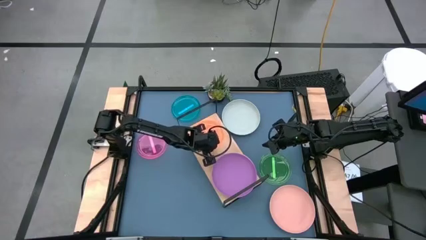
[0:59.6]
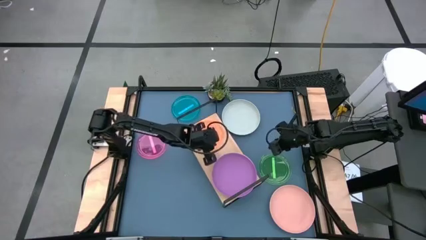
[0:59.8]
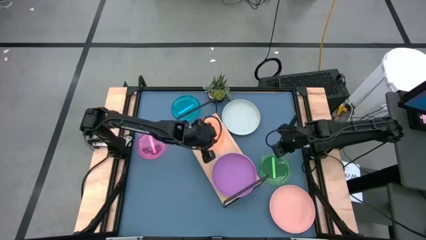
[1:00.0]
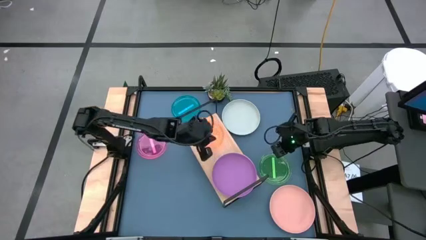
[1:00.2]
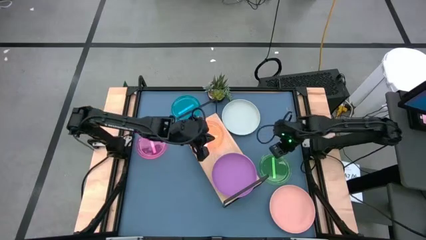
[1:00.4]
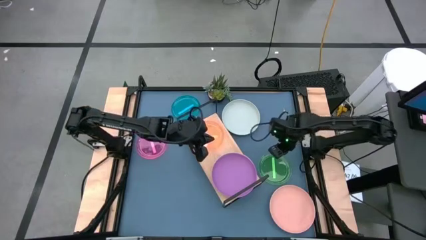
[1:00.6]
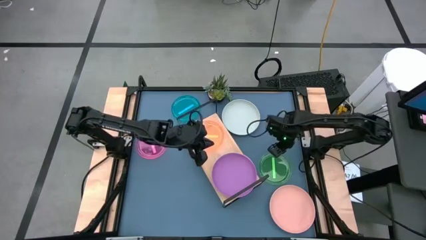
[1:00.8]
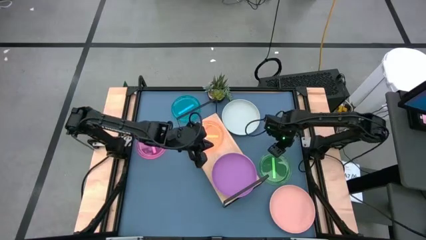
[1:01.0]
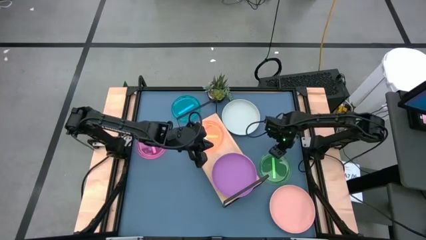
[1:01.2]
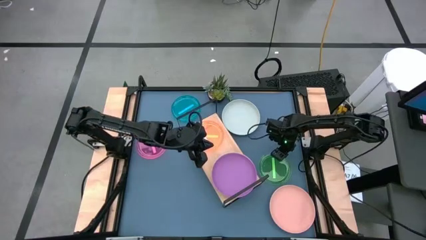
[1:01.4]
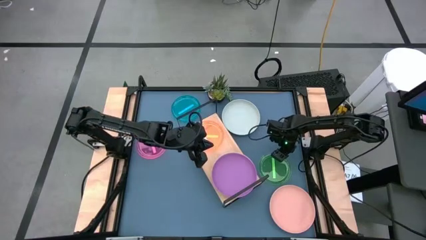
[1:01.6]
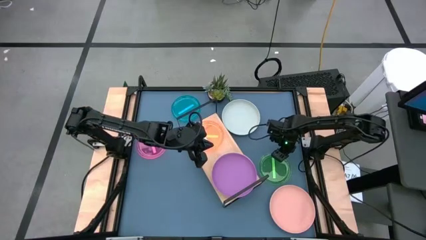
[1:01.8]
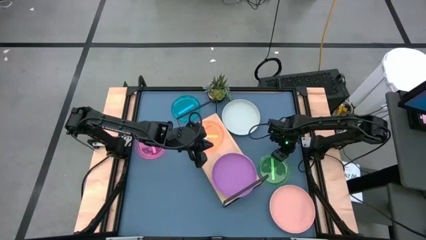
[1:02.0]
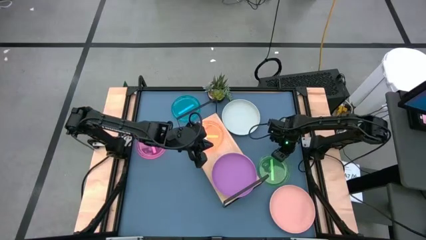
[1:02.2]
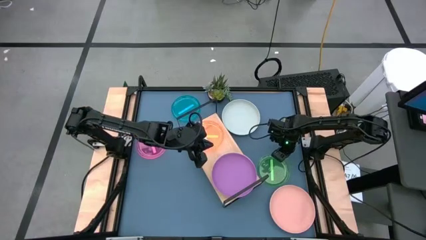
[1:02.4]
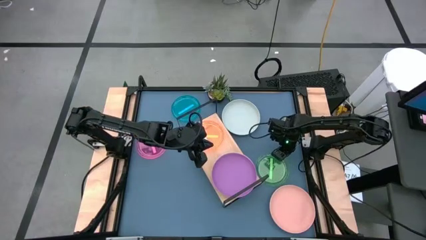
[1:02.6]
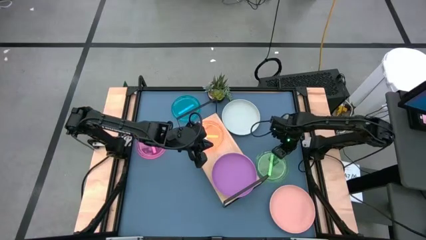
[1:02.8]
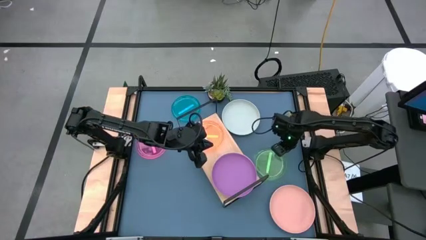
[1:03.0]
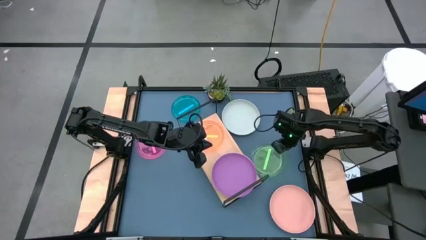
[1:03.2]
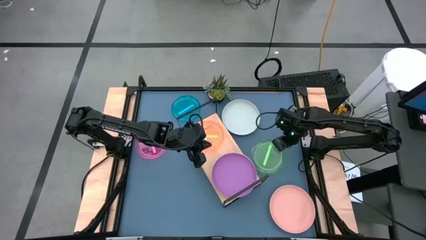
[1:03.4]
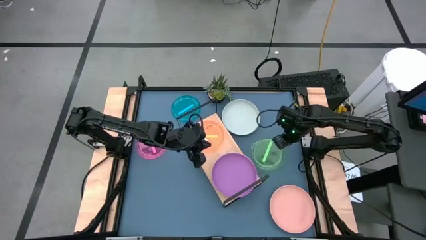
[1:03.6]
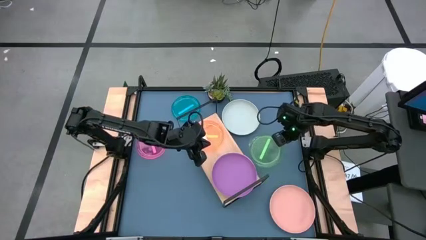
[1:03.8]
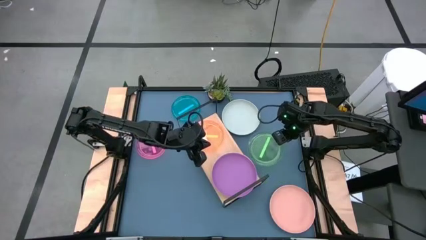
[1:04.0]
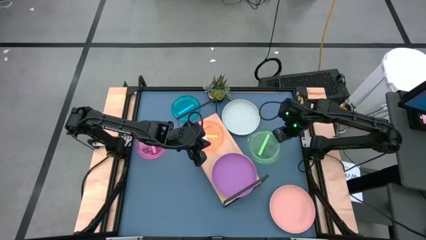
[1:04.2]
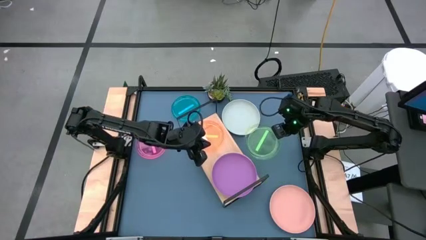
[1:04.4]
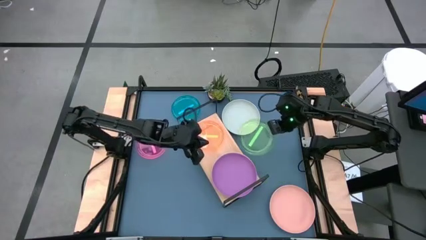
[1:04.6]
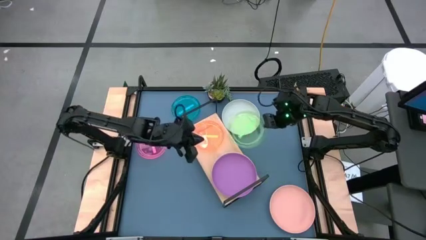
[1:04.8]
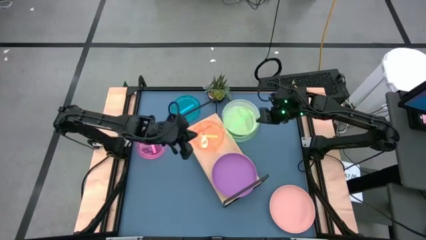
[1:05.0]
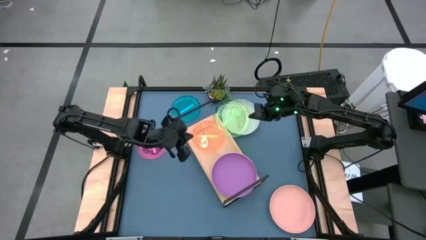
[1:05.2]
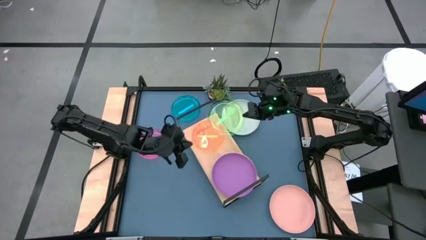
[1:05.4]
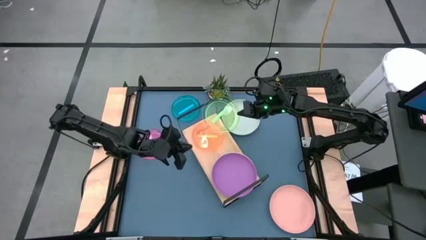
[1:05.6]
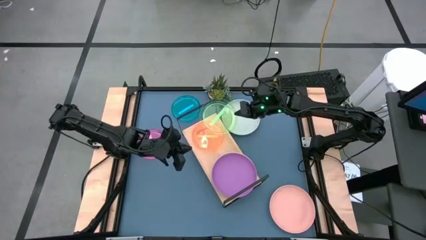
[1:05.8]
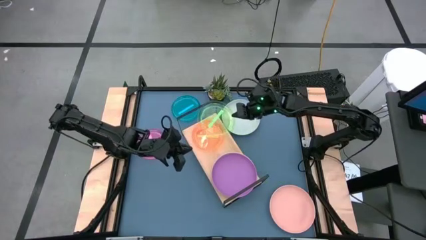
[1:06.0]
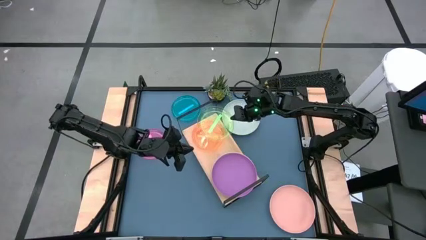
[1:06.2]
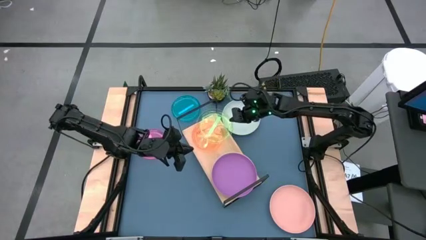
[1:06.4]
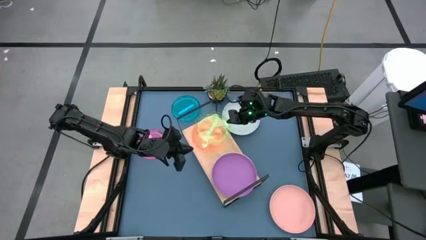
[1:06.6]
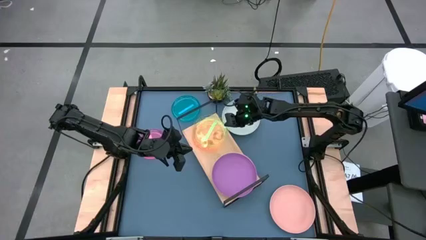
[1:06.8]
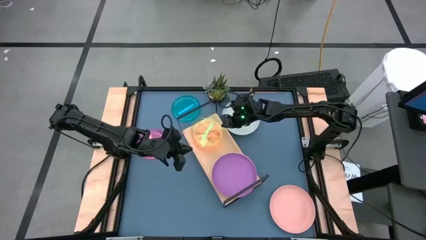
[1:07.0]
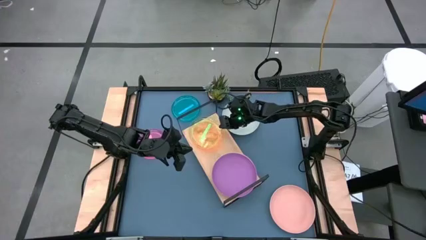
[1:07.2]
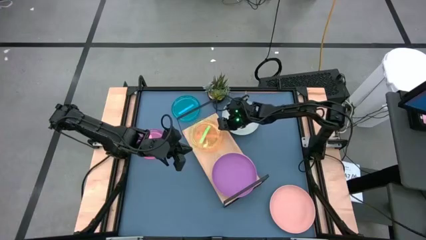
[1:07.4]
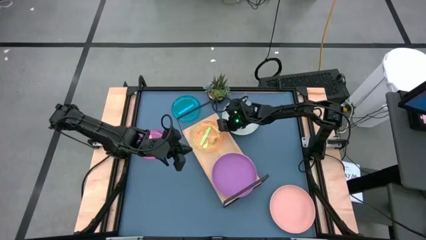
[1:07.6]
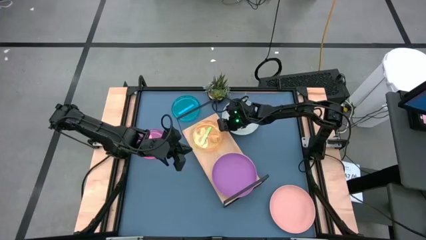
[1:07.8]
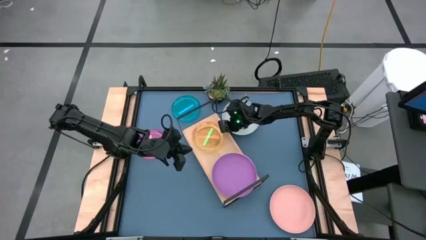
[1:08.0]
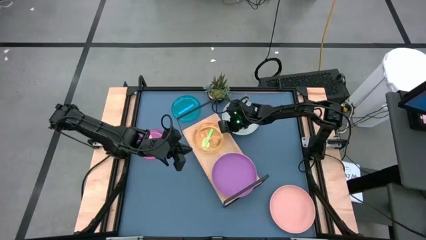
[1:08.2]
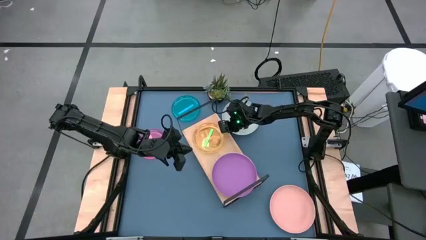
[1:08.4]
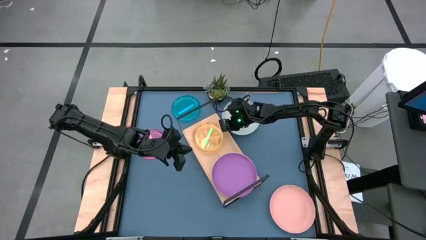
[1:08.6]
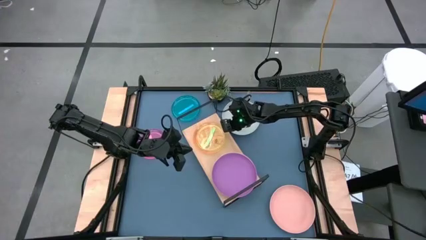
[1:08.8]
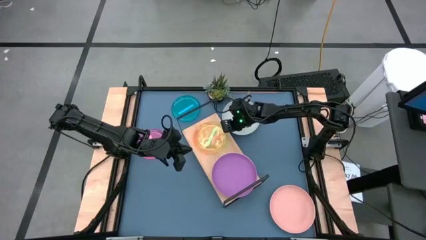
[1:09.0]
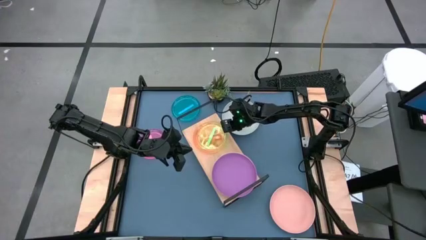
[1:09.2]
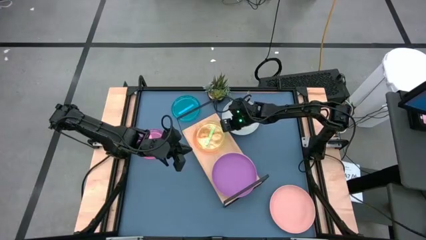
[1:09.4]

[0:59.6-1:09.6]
Task: Place and stack plates onto a shelf
Stack the small green plate on the small orange plate on the shelf

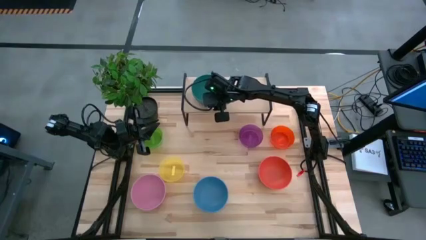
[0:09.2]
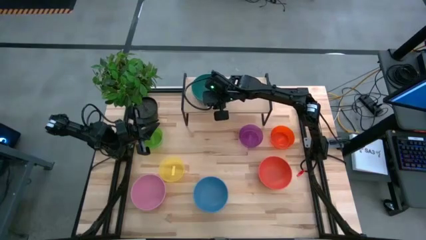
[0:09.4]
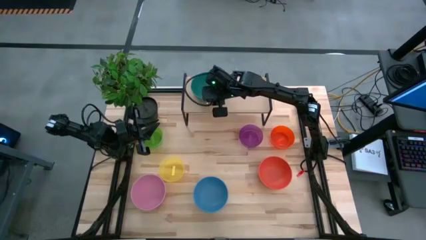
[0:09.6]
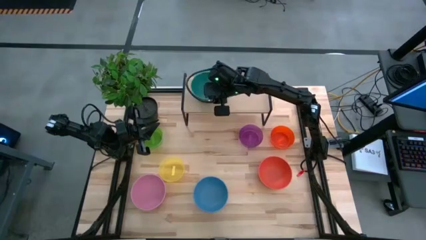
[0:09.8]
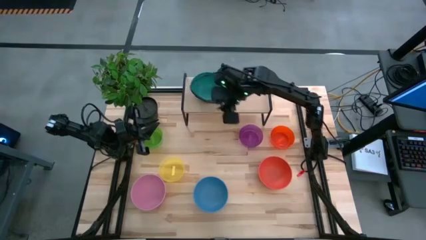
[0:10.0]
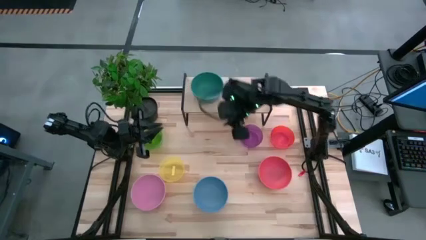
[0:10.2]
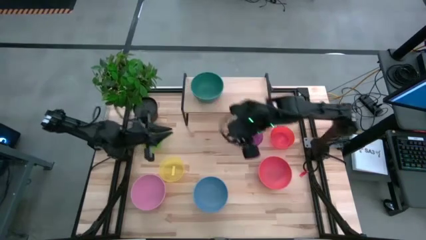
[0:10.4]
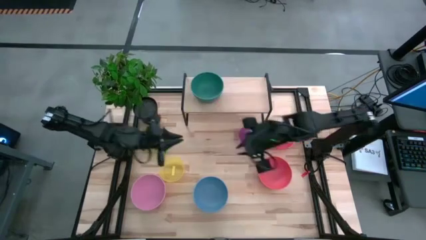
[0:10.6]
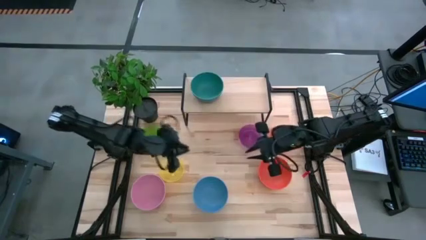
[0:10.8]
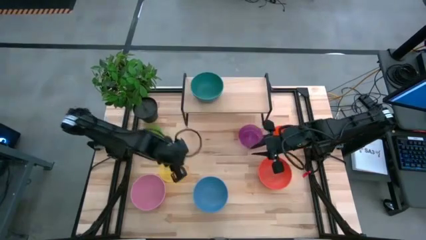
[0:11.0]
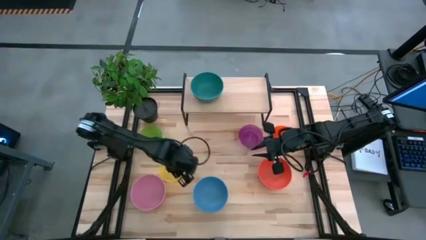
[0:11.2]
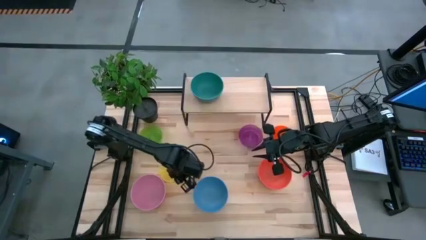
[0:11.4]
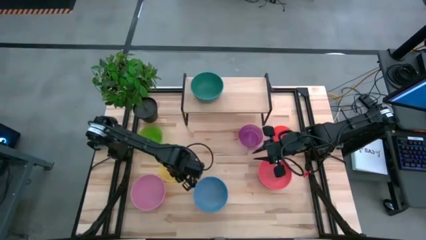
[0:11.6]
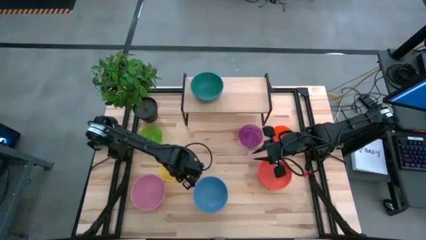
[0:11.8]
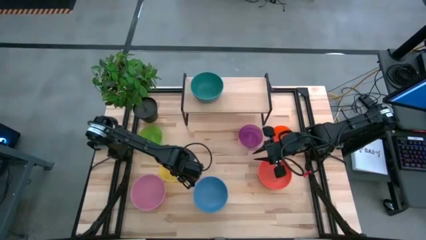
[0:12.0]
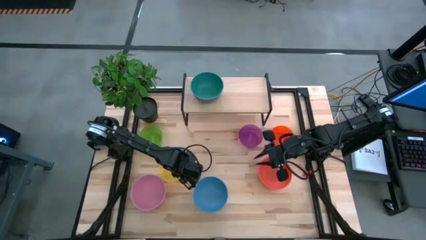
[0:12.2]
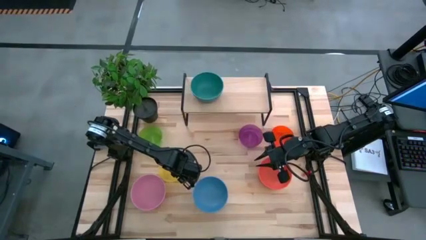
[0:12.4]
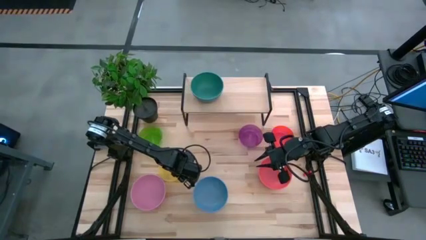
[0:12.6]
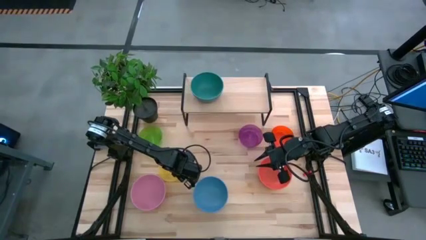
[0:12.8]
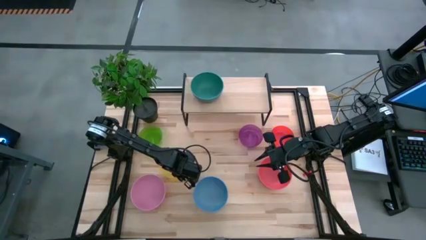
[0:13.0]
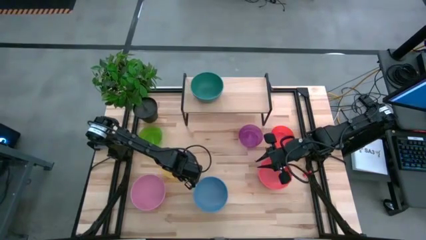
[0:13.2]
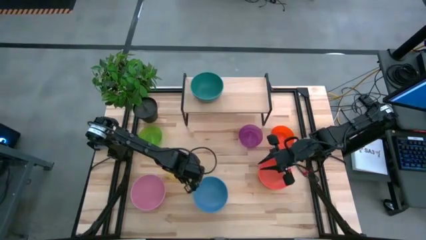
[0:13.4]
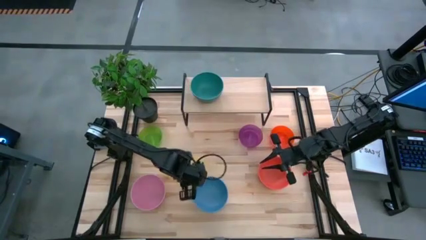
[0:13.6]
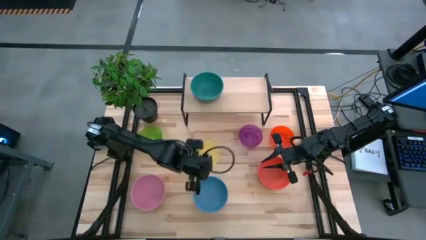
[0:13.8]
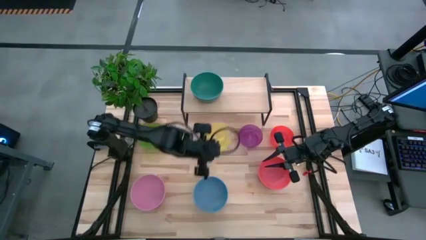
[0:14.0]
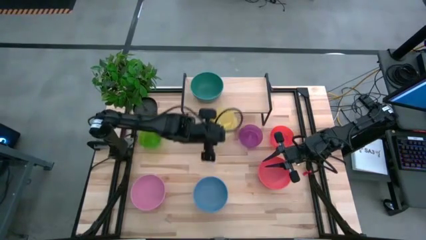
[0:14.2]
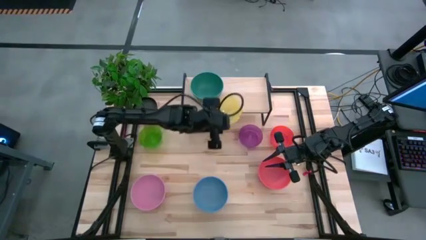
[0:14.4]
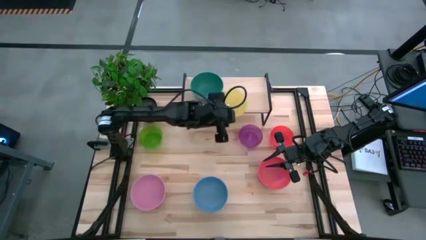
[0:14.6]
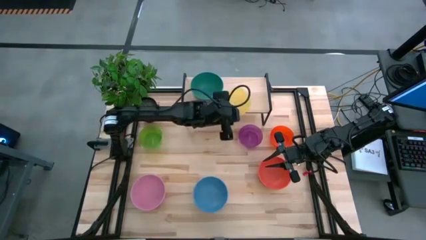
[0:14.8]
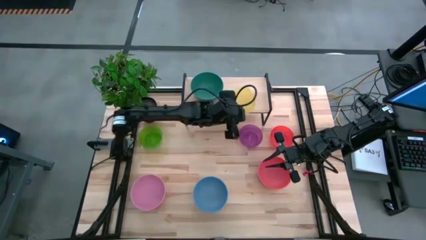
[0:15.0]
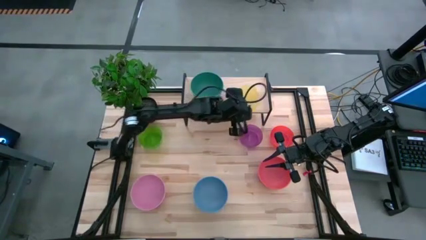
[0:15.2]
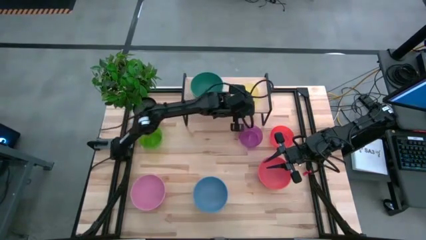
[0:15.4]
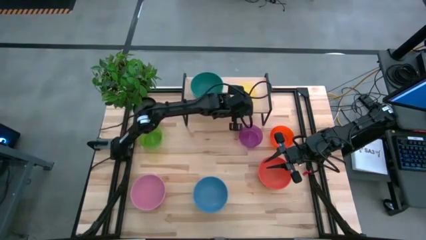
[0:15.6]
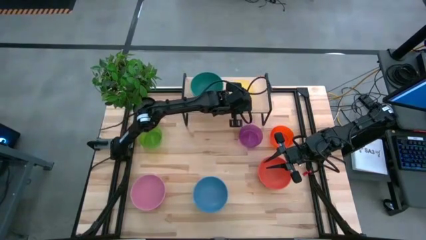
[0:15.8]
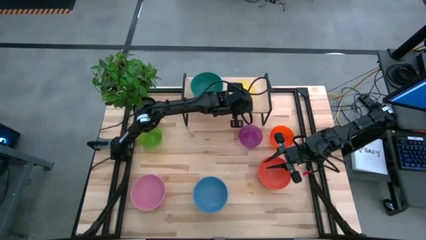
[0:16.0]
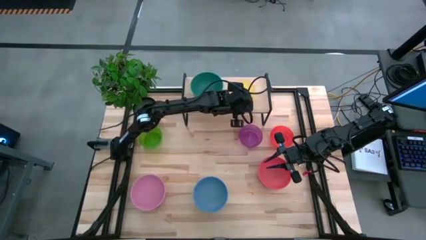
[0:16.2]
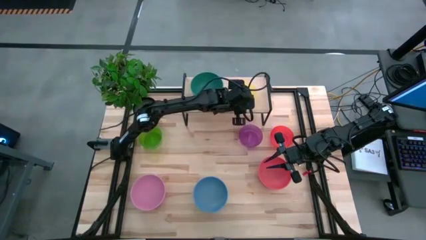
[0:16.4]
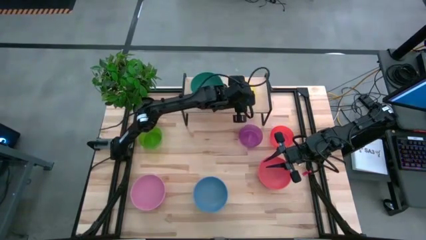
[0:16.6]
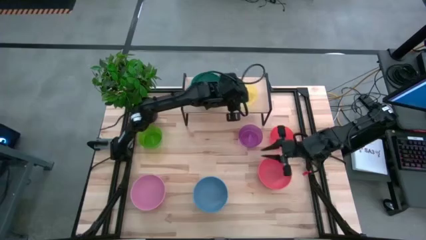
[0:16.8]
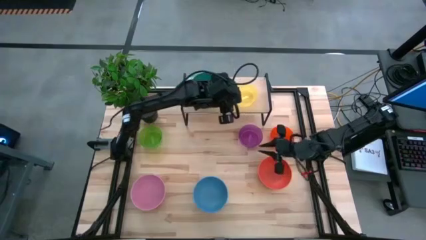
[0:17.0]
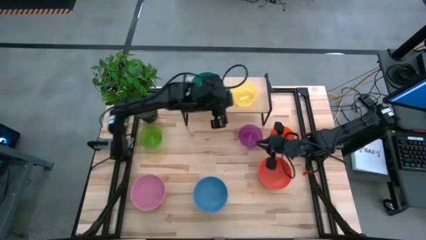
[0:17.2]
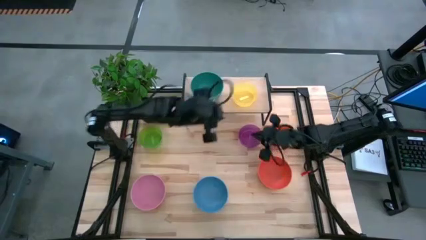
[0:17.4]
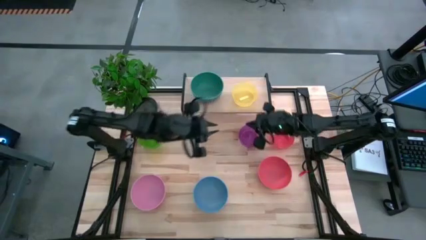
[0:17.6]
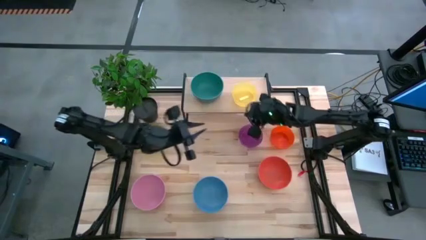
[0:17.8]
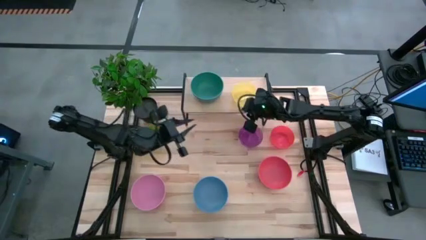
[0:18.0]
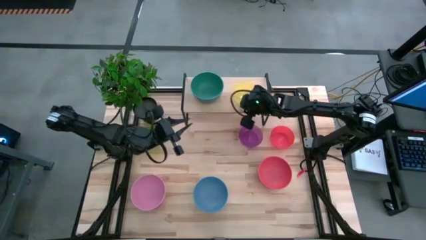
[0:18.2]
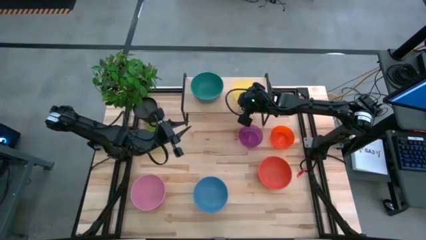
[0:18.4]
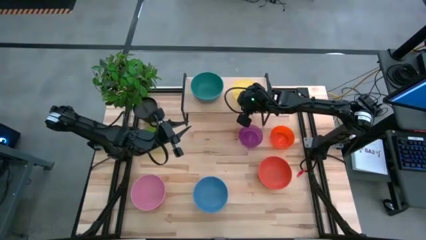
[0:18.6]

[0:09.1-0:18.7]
Task: Place and stack bowls onto a shelf
Put the small yellow bowl on the shelf
